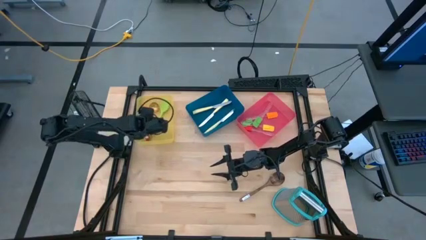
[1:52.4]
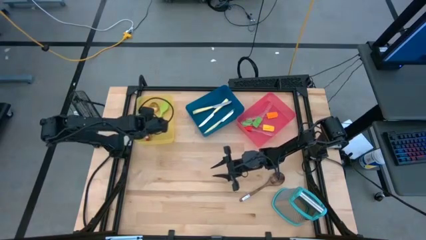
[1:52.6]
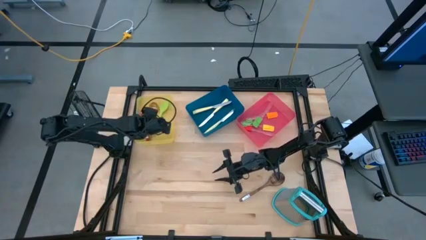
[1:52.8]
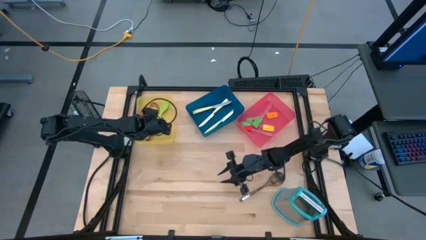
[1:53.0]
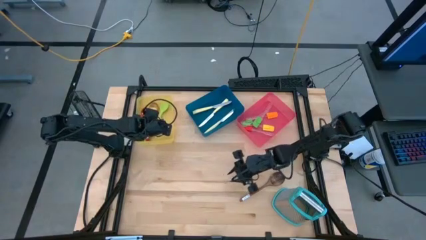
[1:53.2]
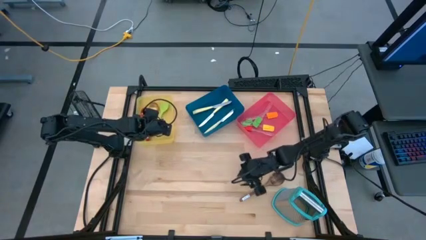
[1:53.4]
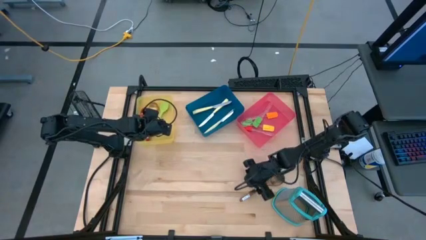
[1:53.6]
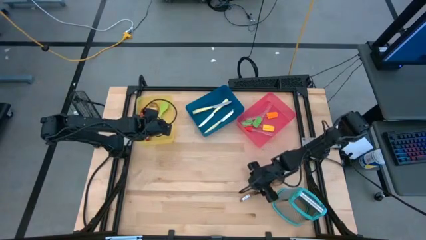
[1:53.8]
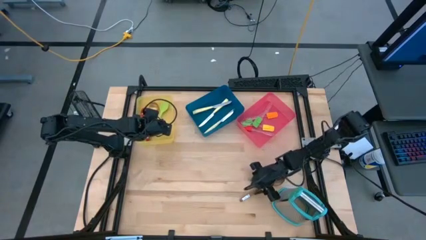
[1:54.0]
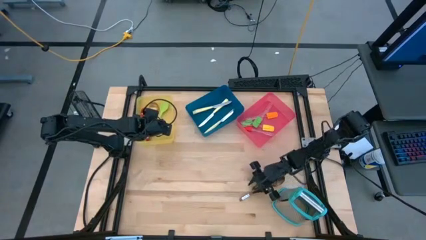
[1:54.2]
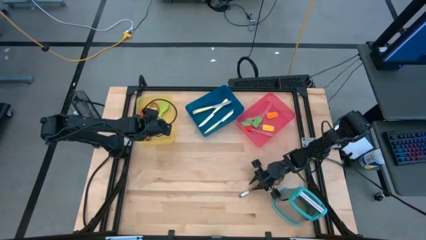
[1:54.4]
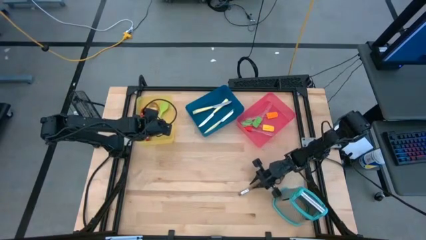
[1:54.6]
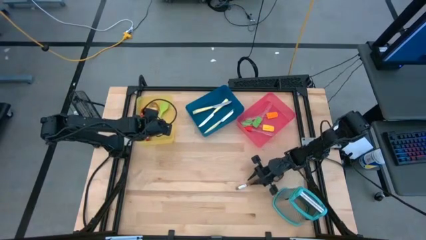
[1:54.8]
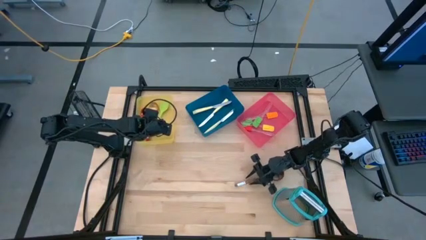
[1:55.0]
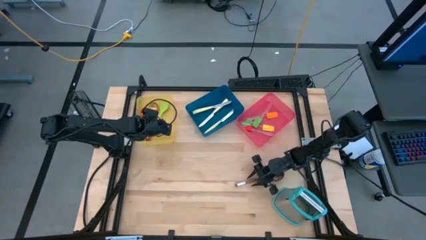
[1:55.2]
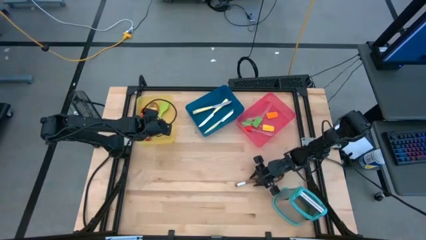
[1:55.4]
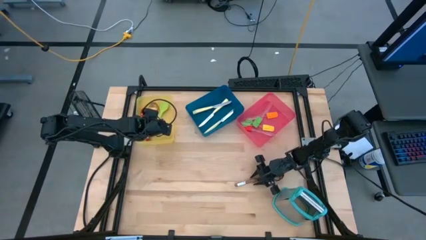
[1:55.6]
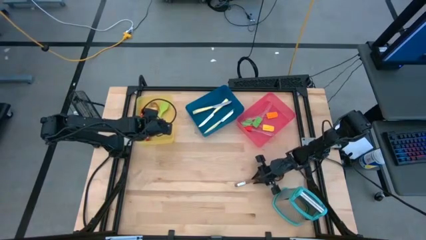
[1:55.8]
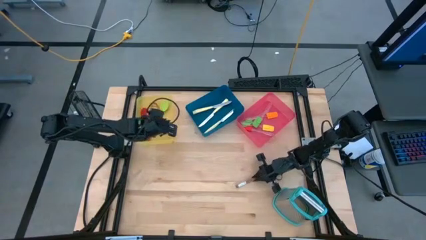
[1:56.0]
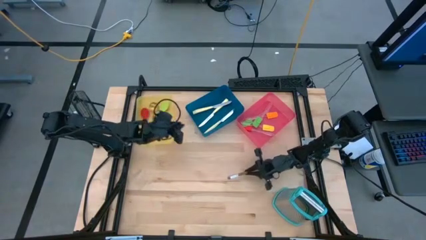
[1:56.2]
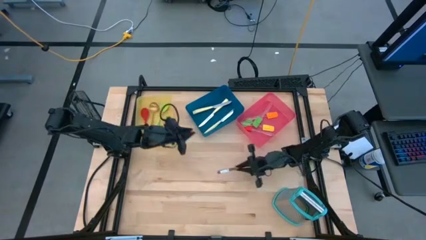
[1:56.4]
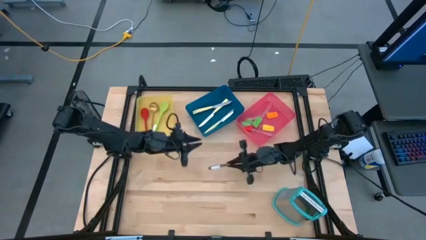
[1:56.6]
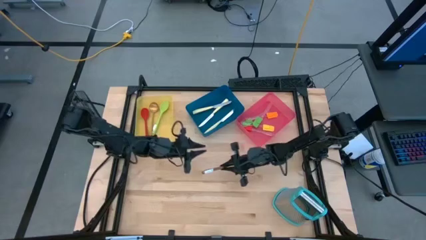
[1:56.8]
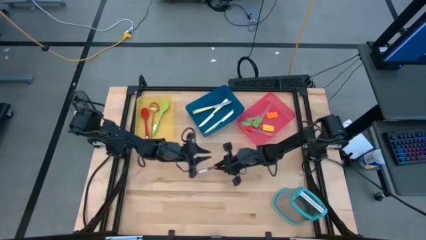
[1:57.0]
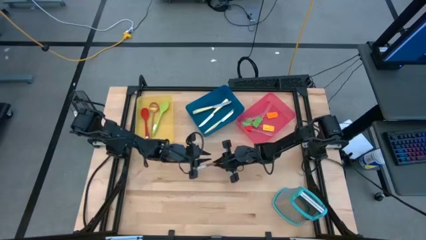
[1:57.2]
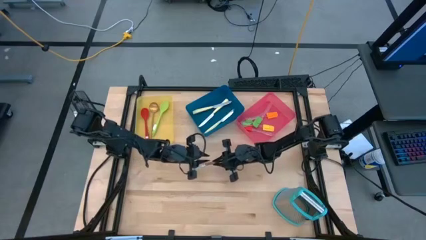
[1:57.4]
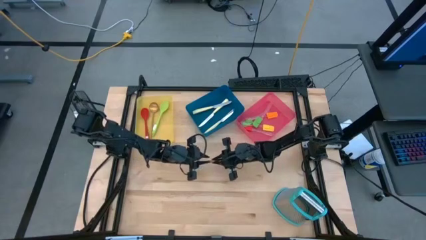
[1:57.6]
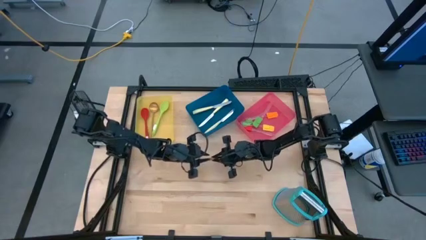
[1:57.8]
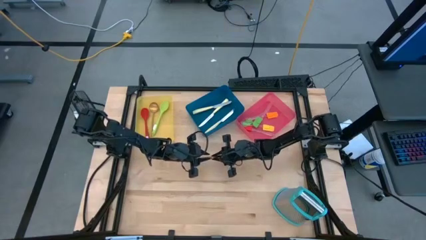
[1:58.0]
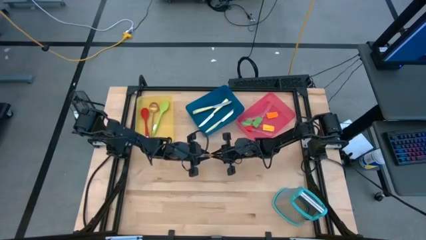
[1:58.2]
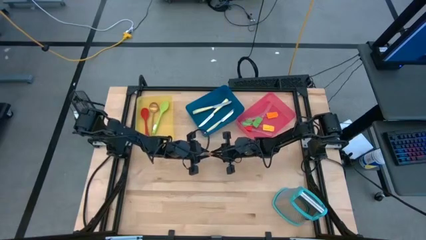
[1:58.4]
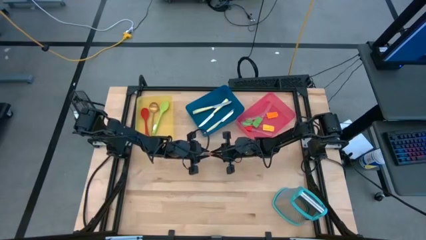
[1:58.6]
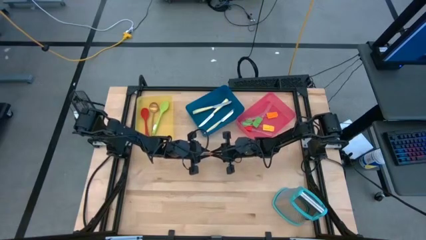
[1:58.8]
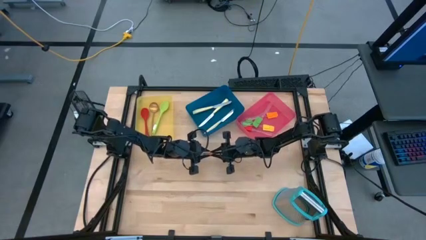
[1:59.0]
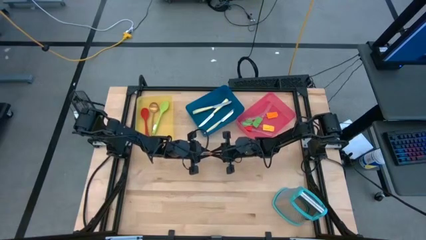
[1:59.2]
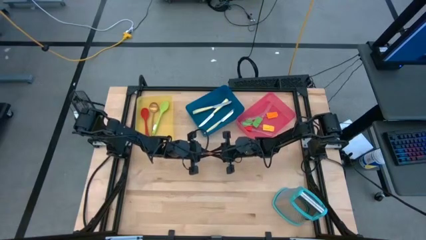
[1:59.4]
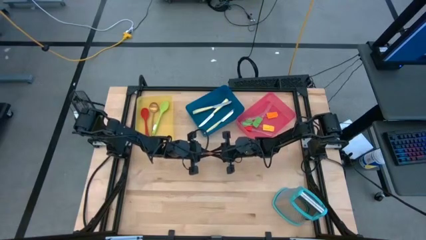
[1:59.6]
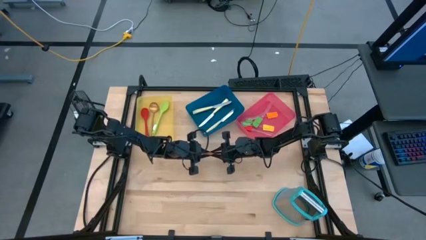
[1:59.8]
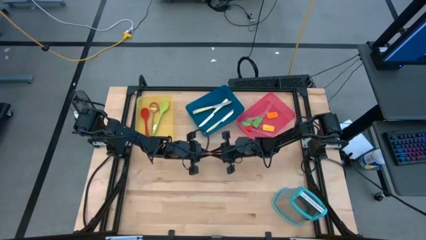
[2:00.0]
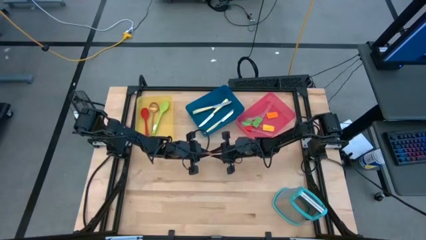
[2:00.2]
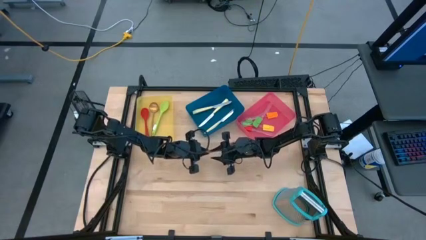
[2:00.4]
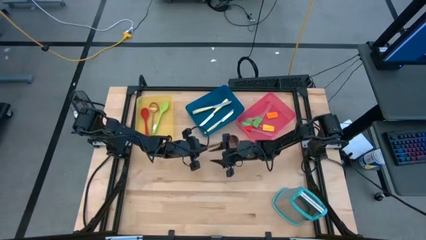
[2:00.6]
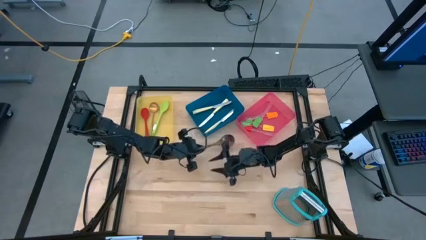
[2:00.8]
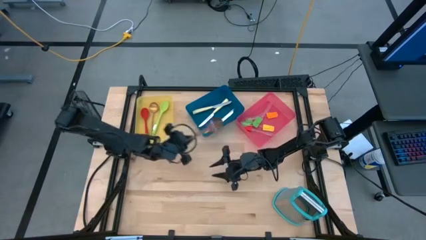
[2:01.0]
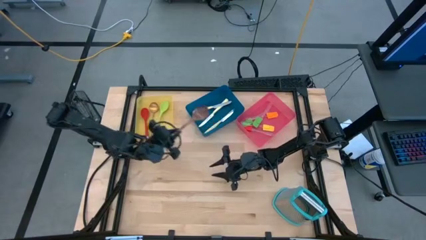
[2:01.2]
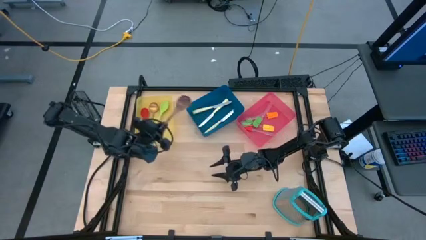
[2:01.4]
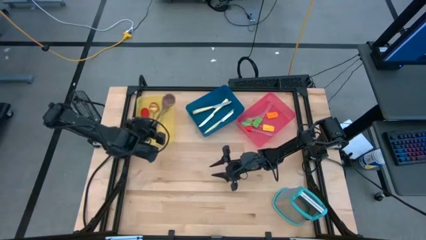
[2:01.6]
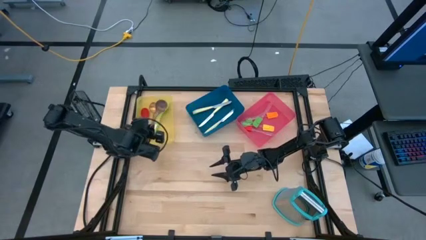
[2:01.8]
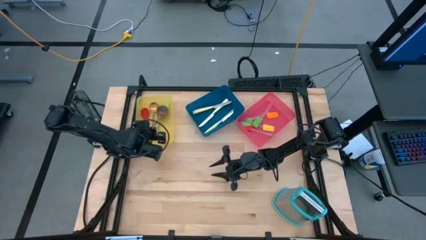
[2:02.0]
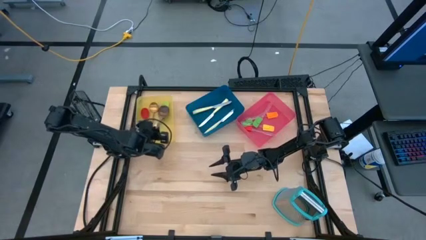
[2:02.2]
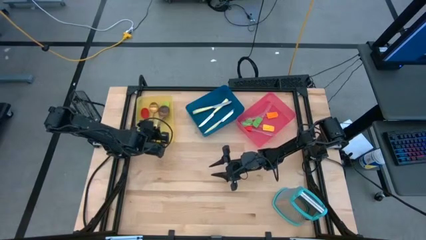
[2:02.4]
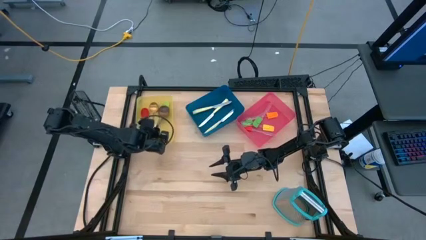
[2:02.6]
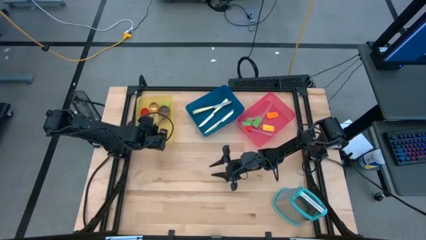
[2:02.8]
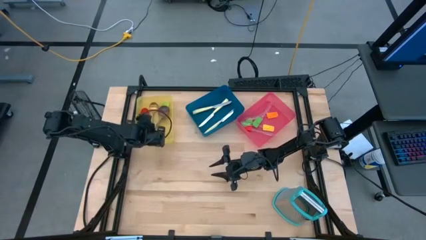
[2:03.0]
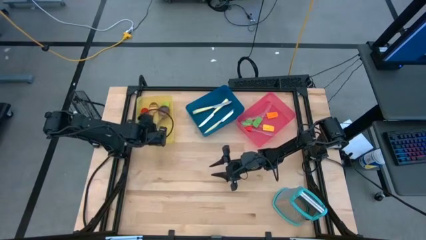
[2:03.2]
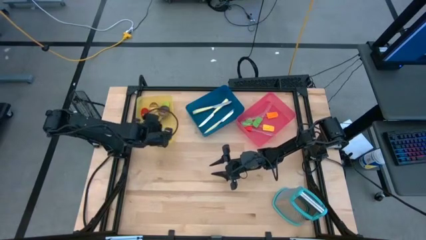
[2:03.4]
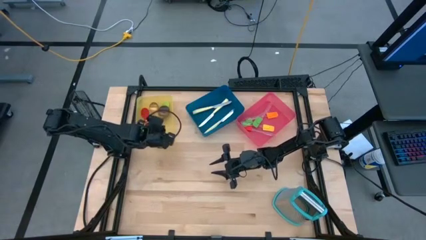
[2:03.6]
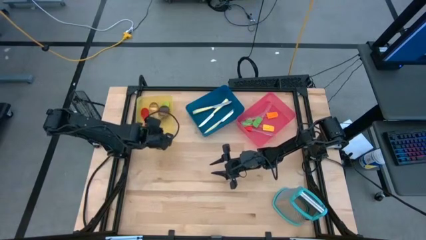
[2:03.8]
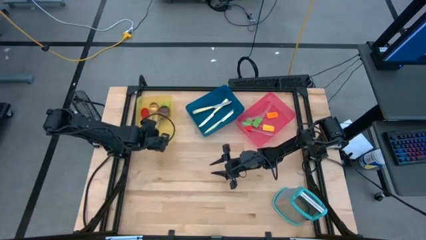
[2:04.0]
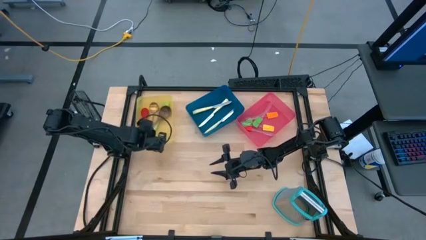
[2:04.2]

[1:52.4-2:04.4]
Task: Pick & Place Kitchen Items
Put the brown spoon into the yellow bin

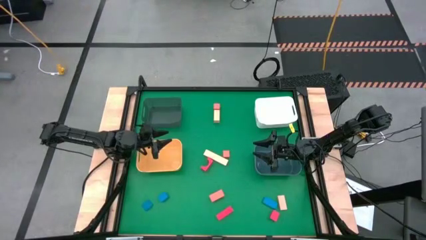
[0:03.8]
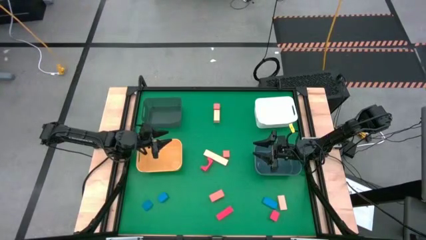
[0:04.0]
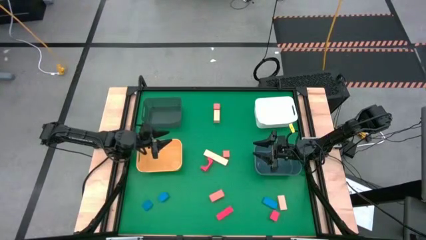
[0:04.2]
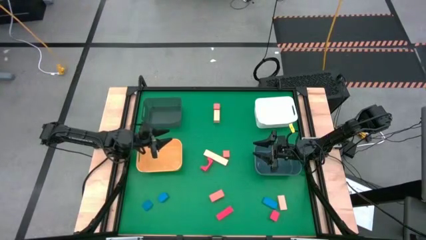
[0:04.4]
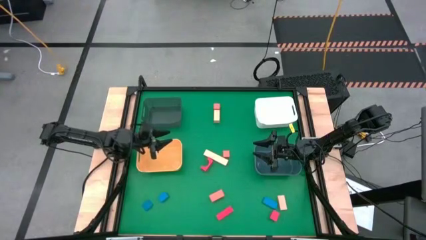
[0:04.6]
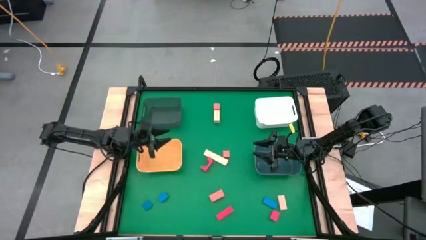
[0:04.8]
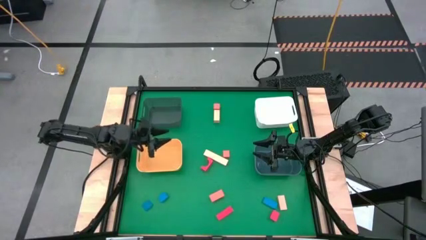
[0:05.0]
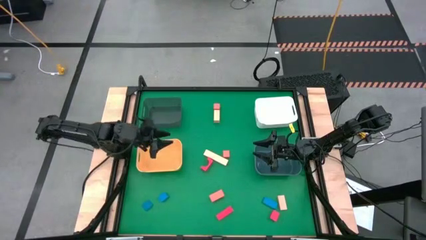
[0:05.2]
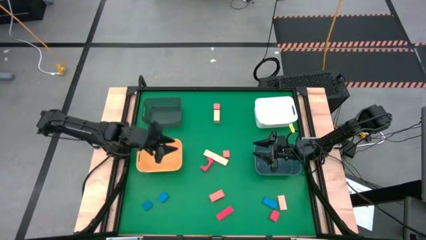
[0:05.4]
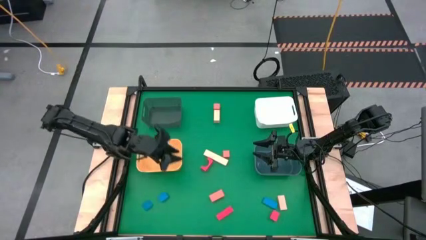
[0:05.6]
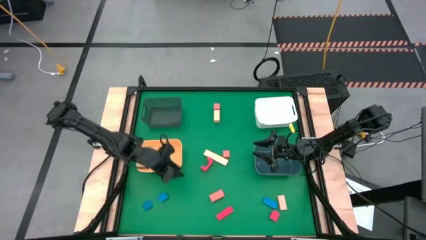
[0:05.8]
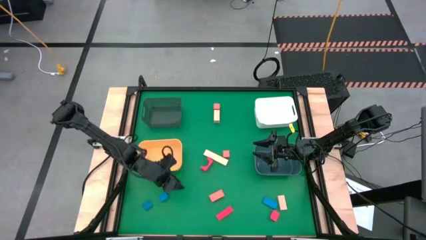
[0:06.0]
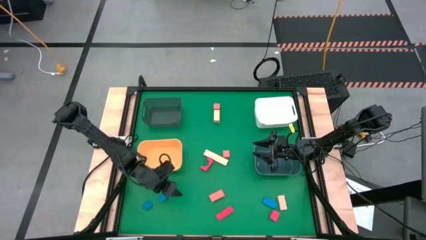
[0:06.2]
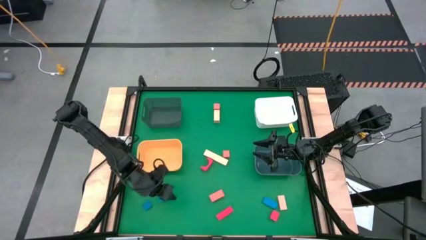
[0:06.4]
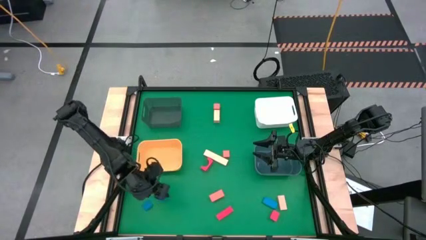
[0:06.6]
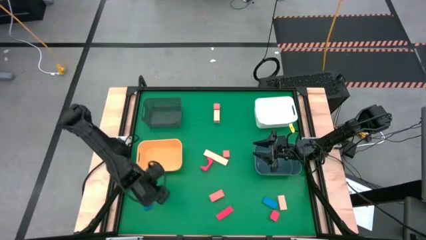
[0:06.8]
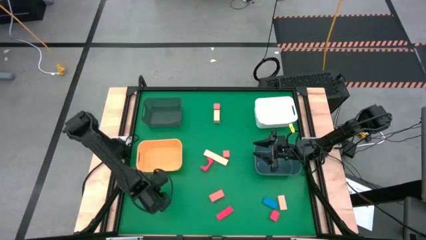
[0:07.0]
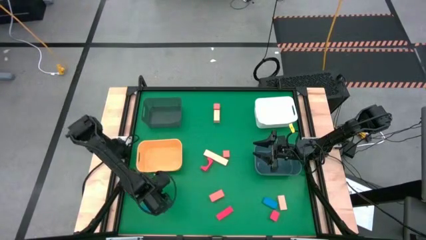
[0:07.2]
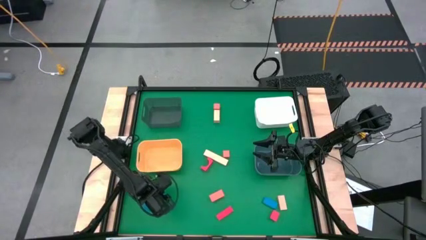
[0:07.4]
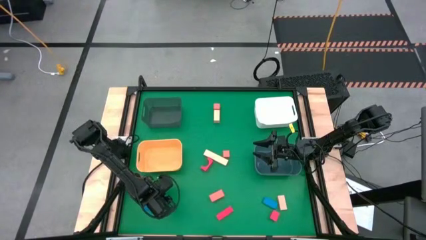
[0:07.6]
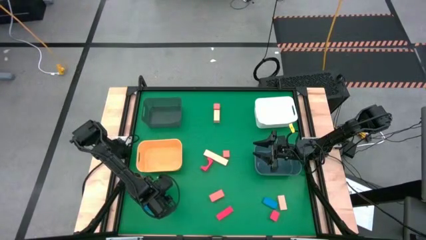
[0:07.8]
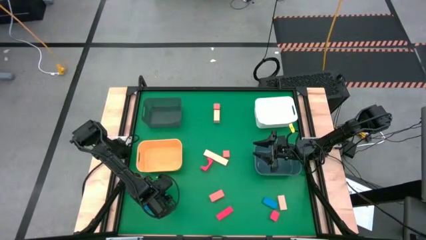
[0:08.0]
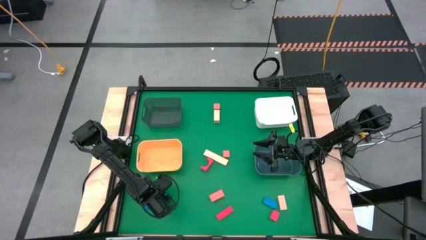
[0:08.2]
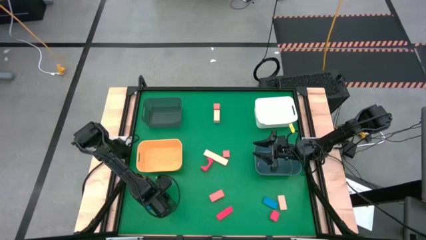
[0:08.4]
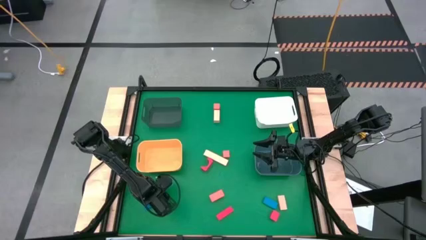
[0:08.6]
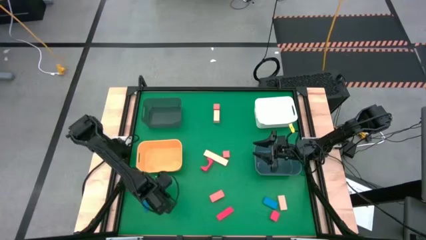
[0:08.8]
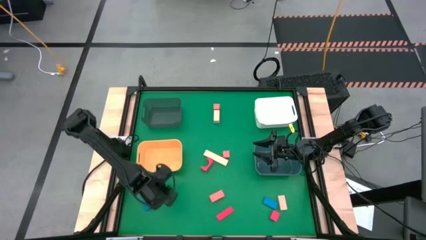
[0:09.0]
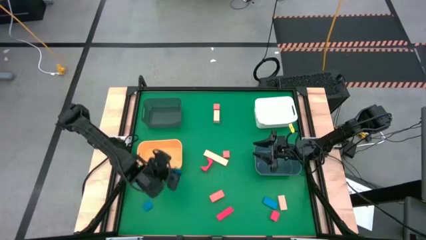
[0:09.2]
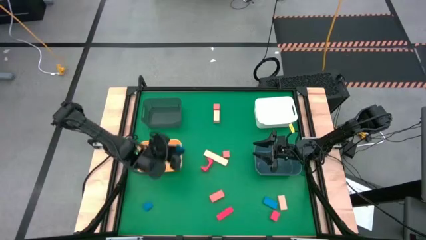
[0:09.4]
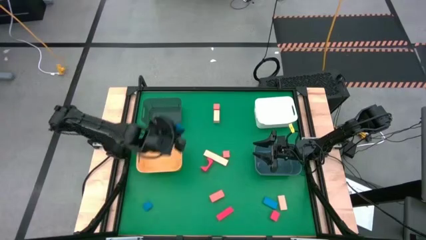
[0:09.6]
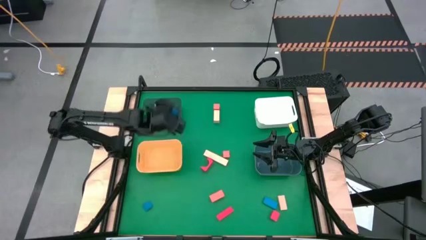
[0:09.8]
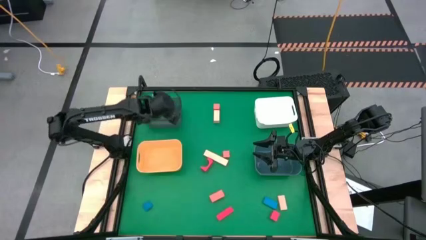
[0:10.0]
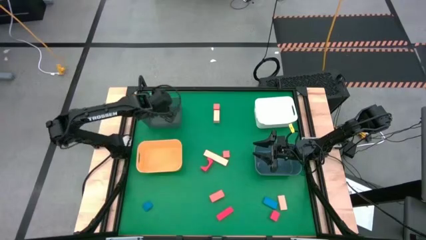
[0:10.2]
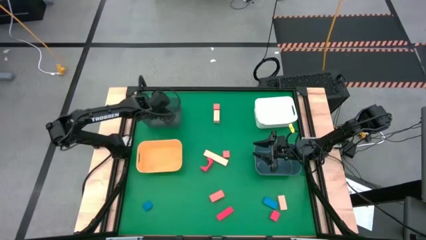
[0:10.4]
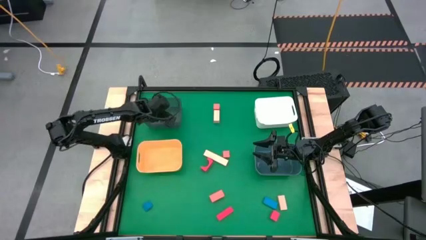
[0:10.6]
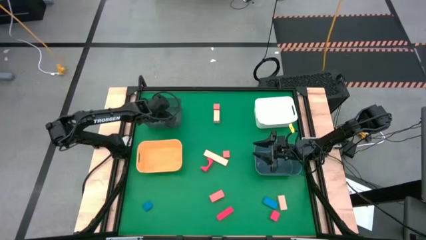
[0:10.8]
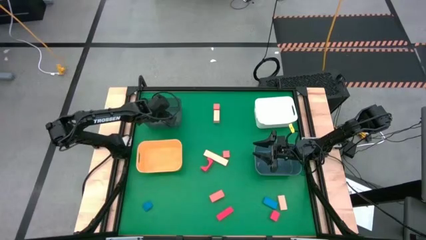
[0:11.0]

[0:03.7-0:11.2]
Task: Sort & place blocks by color
Put the top right blue block into the black bin
